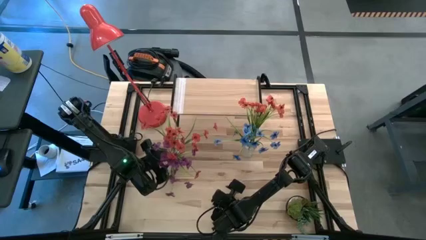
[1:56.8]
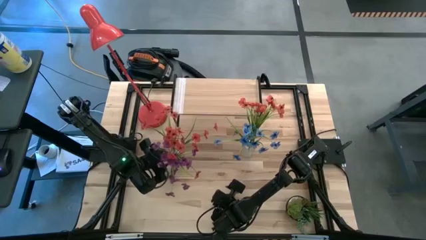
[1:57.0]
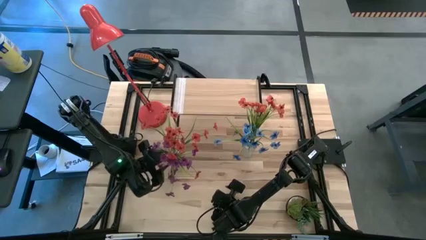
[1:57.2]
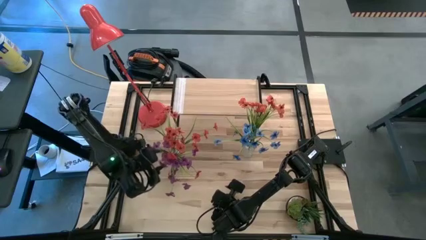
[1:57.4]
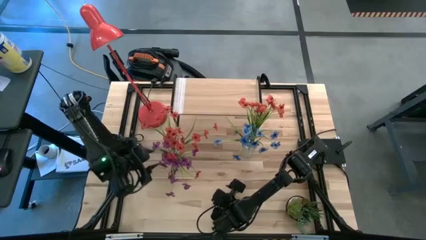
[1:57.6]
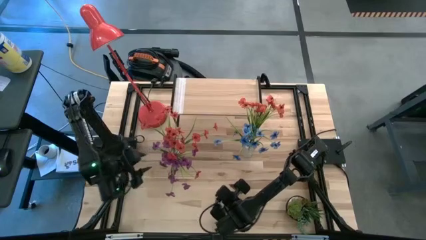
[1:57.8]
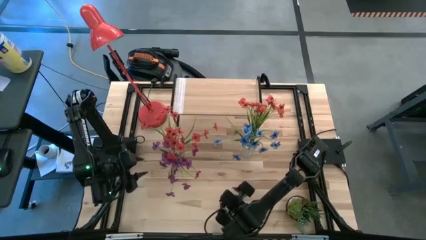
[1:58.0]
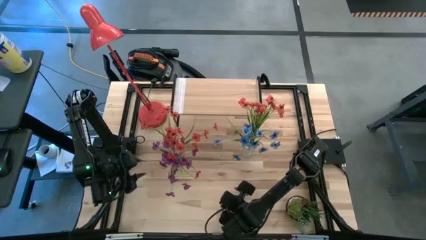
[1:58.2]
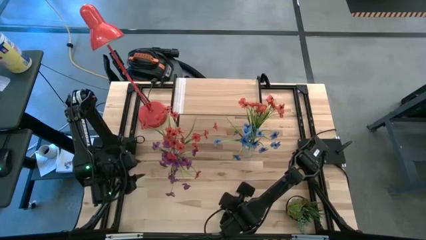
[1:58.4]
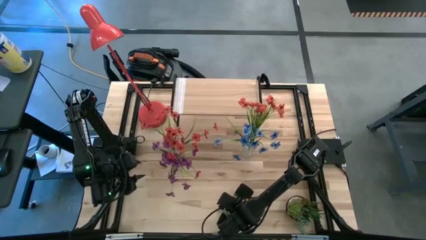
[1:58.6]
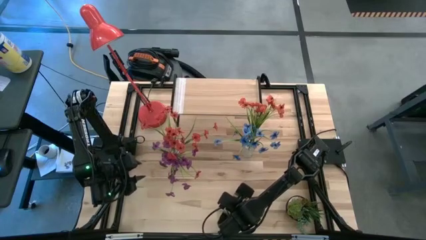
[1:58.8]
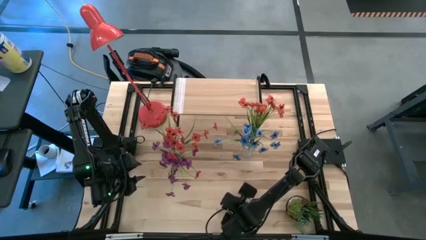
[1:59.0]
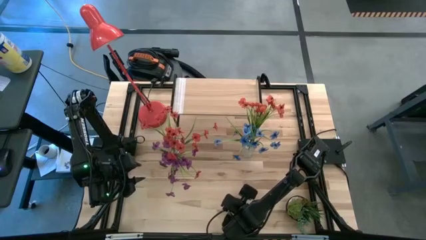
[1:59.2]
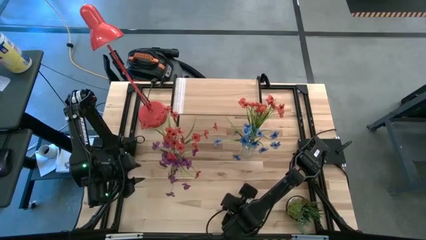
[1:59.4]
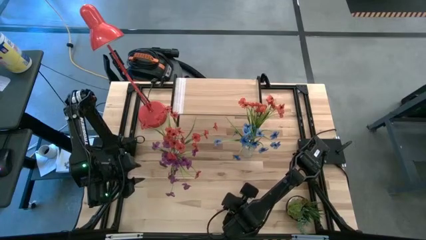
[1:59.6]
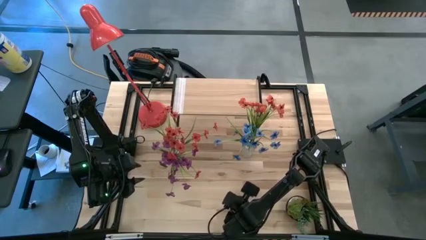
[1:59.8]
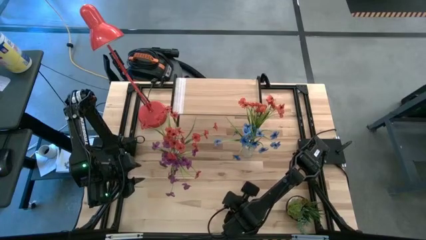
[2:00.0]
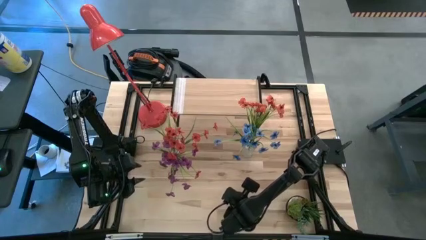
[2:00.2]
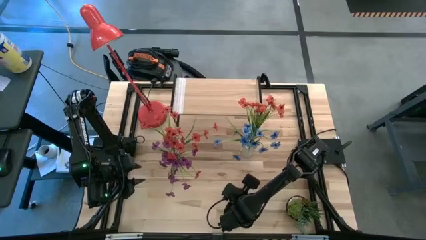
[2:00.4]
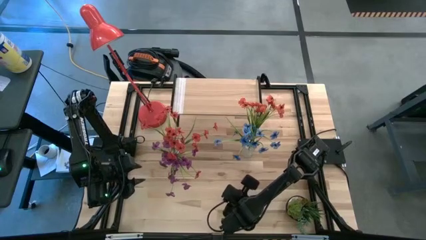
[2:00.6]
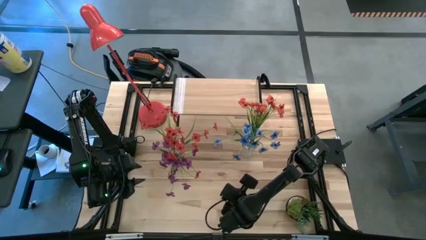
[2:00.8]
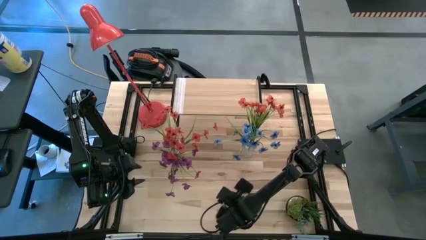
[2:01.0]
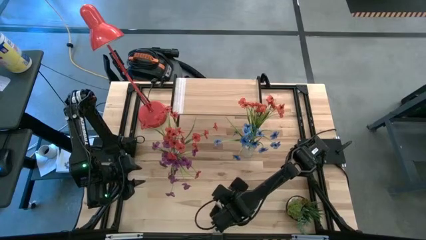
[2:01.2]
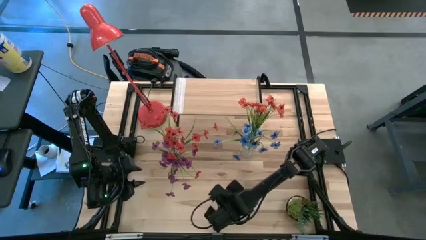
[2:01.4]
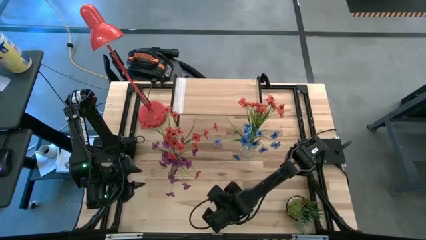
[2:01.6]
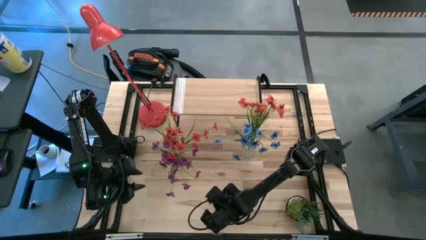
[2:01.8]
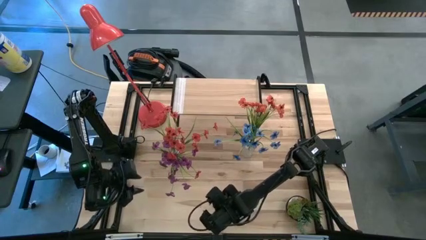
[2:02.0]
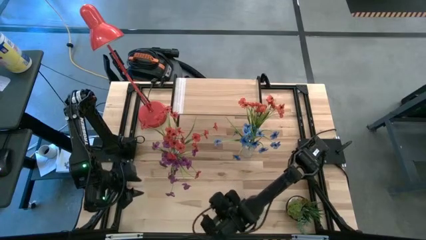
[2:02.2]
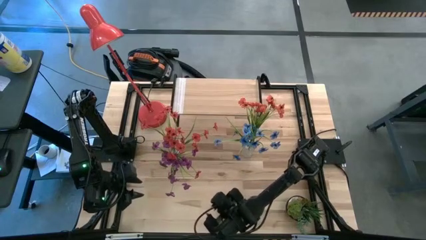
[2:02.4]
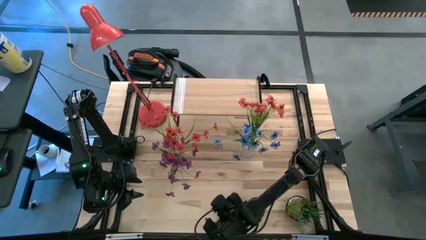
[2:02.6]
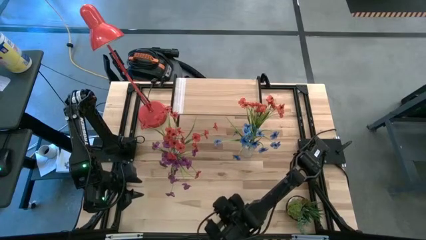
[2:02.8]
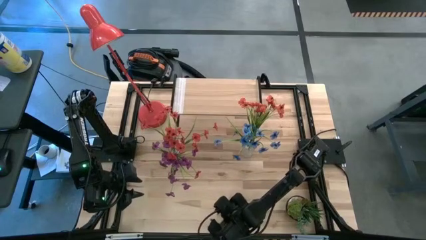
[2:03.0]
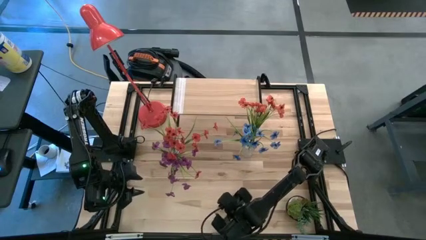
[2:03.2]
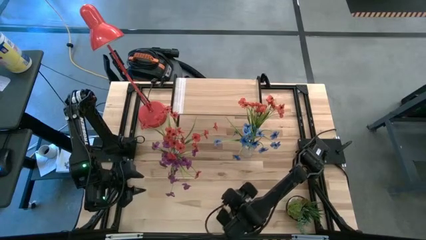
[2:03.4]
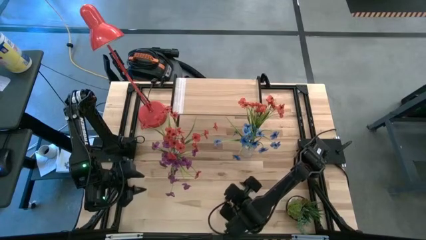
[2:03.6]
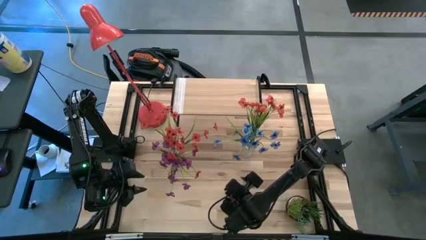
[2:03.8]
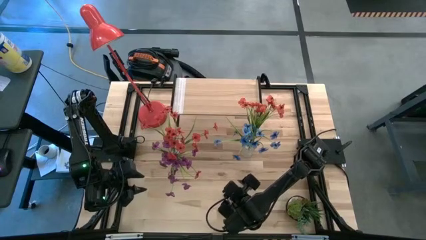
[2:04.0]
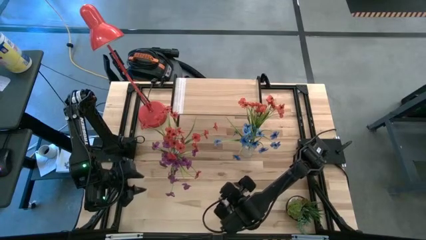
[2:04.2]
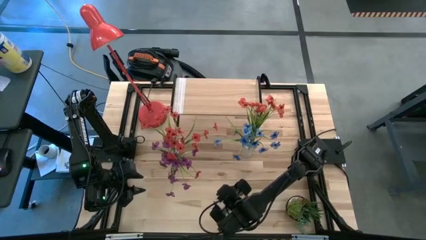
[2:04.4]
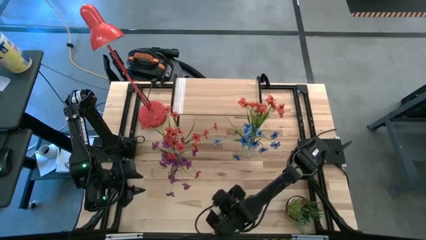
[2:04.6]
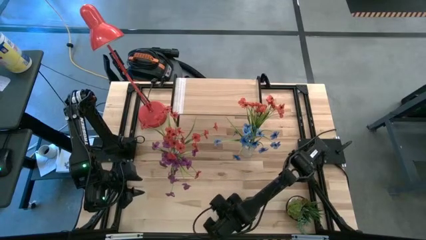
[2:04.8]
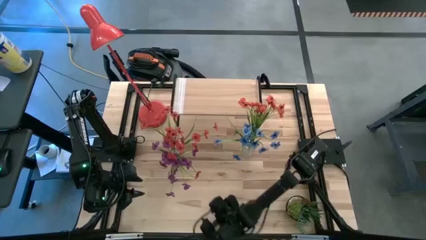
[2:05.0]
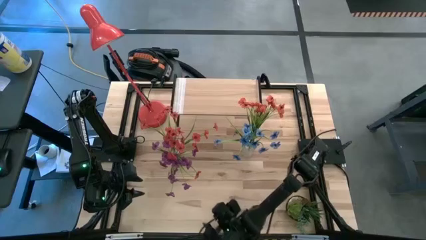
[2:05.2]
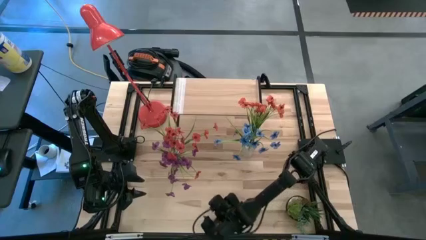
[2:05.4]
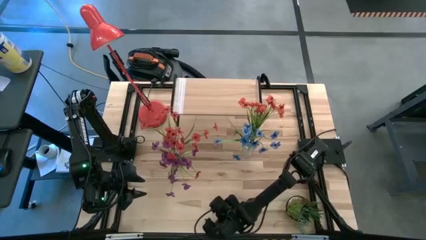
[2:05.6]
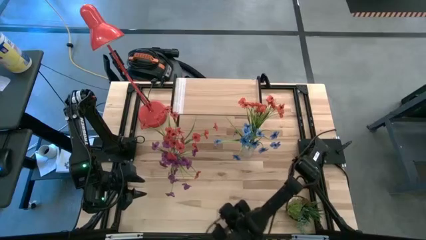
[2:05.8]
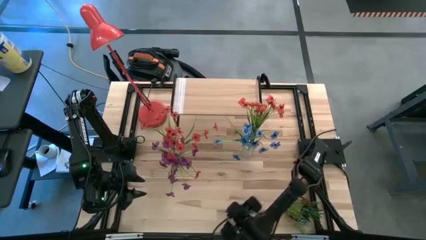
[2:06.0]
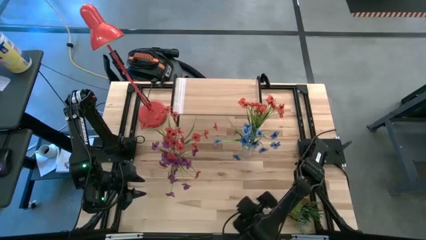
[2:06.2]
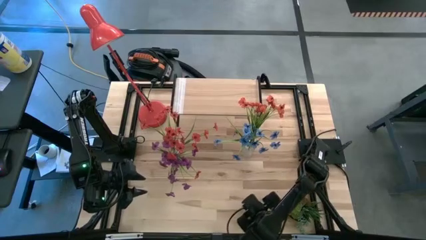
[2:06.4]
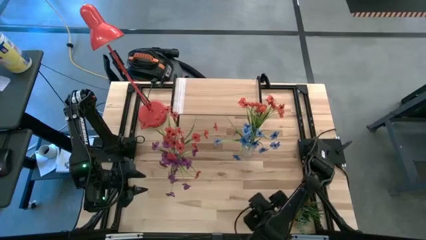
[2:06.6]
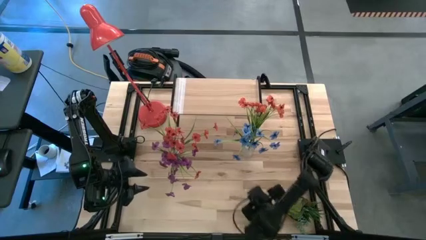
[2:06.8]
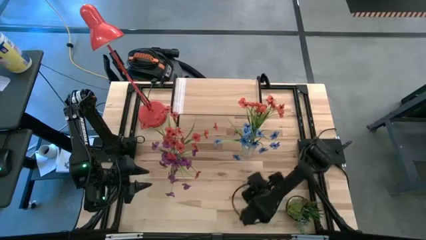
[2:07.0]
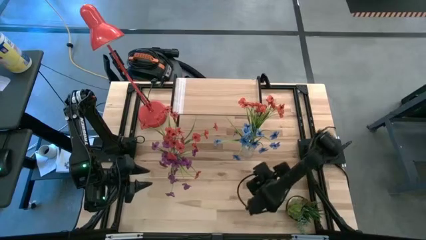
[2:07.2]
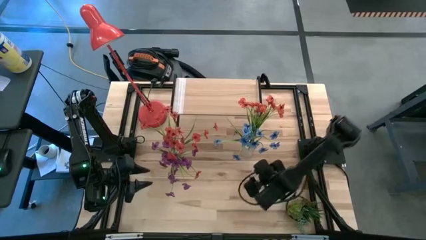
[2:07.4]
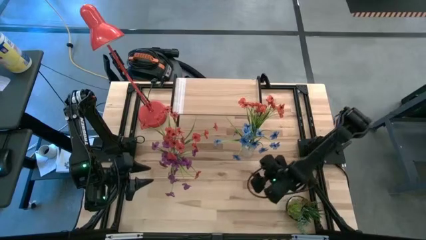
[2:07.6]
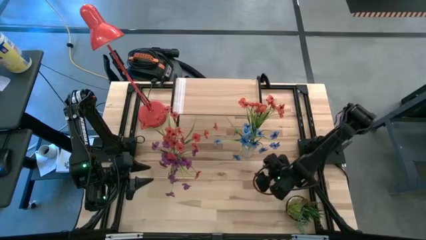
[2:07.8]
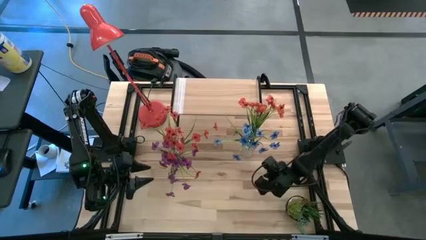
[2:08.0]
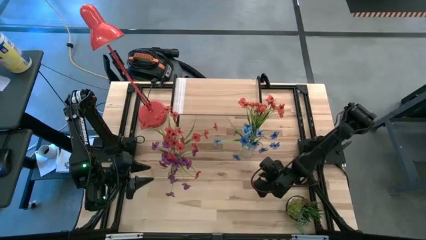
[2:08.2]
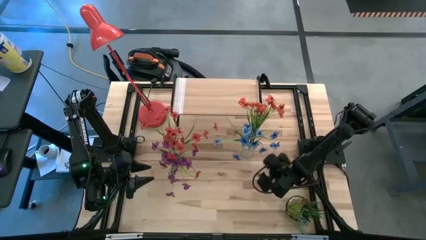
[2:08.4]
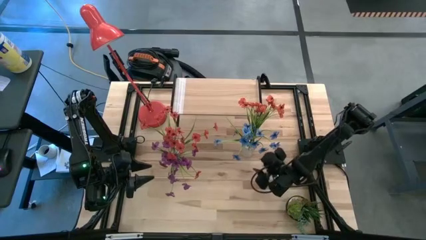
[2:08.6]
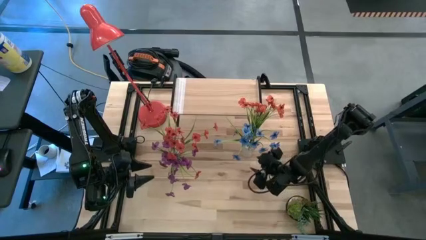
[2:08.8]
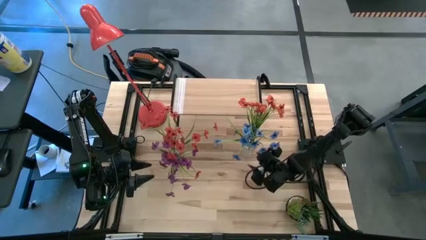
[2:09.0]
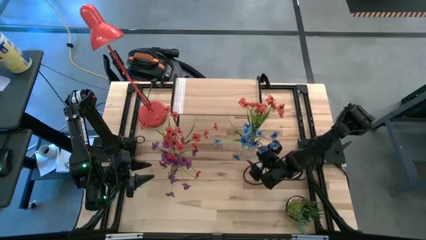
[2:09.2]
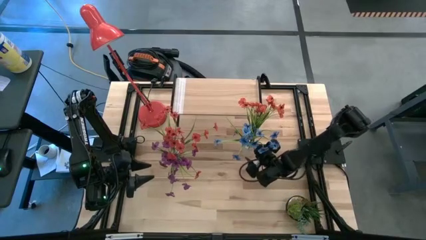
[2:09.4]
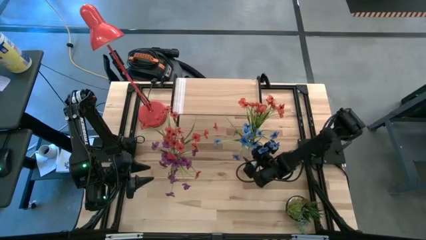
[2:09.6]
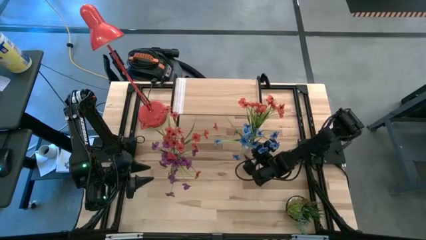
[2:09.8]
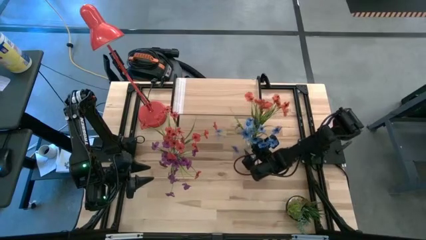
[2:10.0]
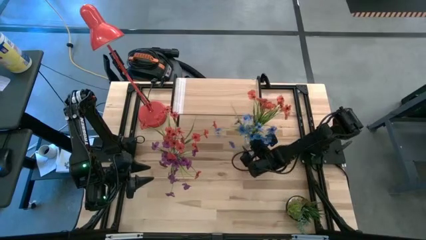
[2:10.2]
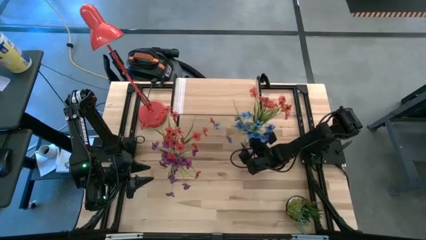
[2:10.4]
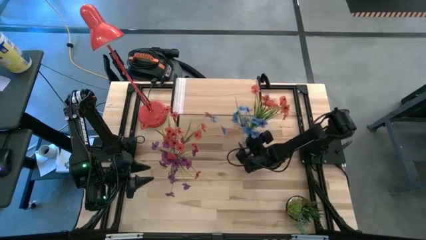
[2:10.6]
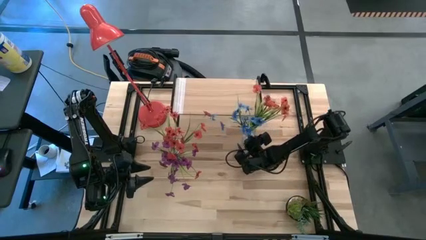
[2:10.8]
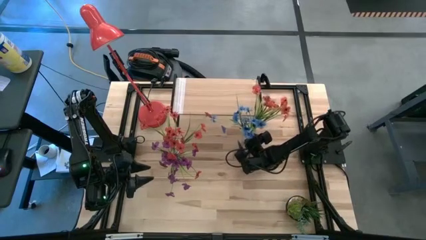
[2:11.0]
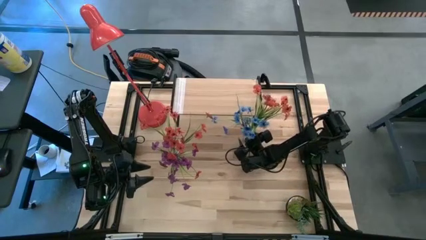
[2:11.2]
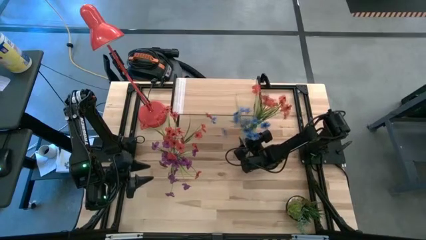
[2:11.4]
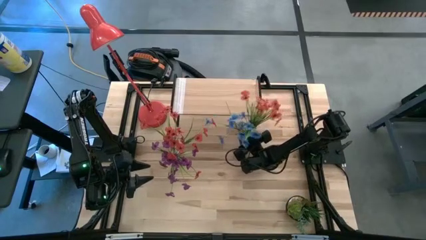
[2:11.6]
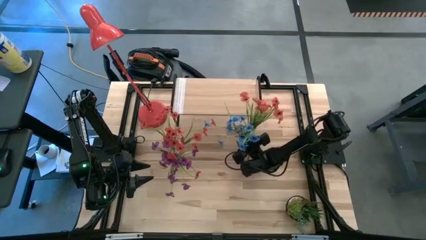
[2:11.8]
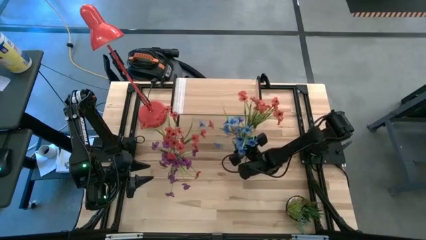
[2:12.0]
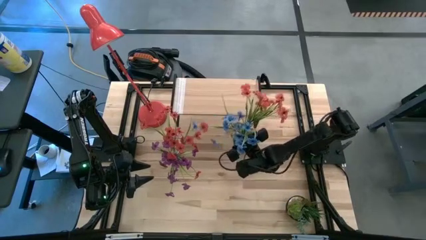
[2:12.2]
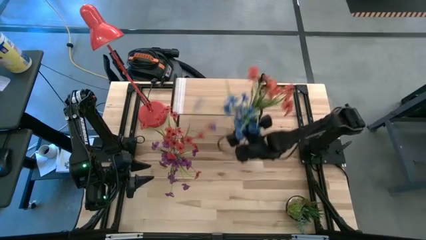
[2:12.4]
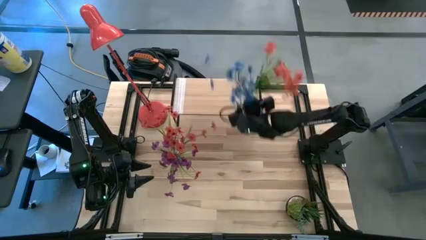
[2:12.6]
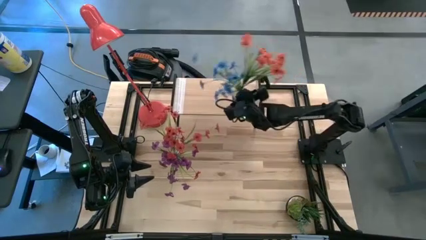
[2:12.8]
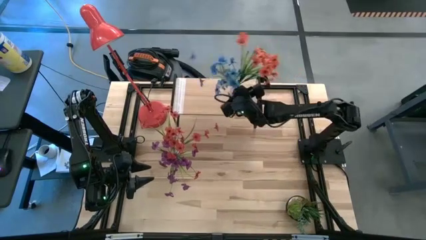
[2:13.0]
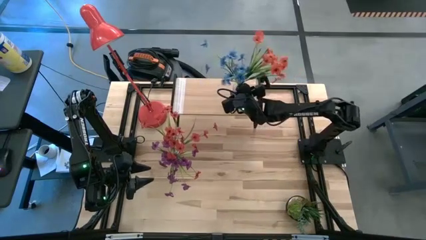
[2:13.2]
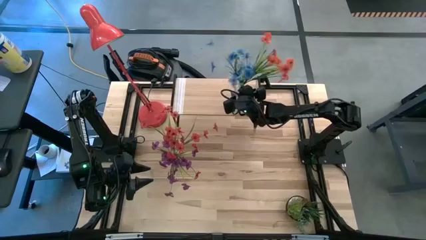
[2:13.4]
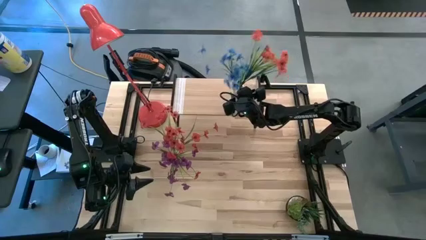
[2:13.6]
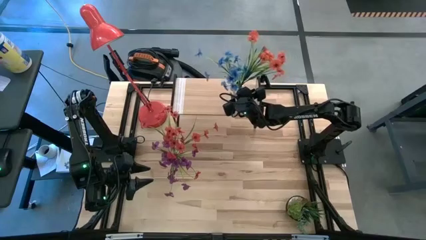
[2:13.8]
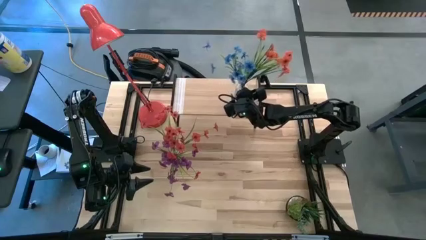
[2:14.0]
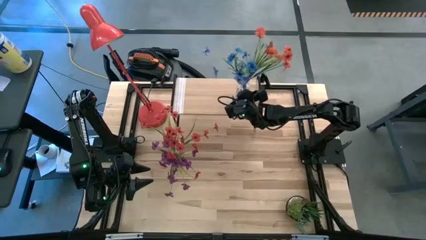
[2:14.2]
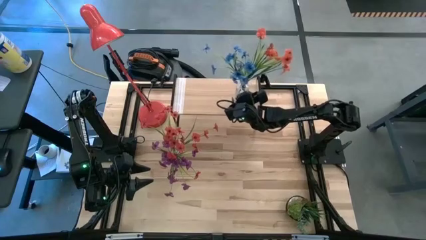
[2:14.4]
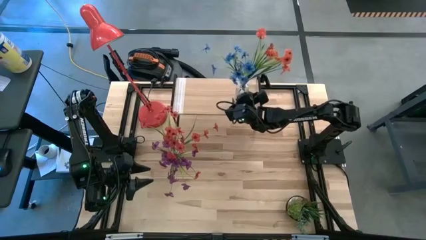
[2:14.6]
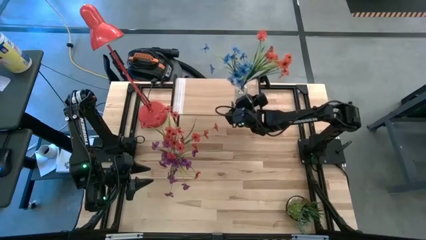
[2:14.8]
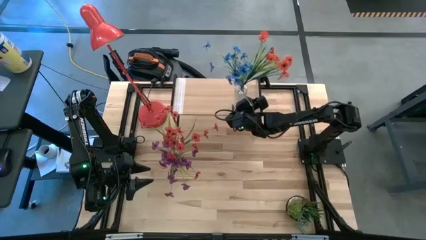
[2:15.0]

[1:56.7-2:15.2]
Task: Pick and place flowers into a vace then onto a shelf
Put the right transparent flower vase containing the blue and orange flowers on the shelf
